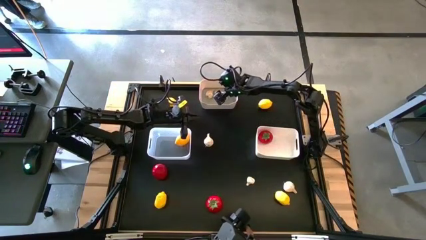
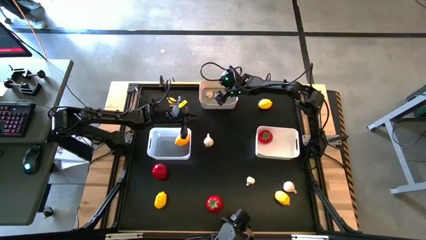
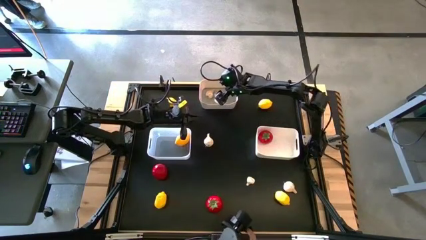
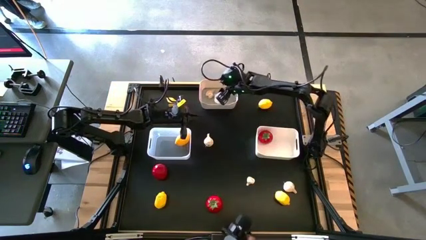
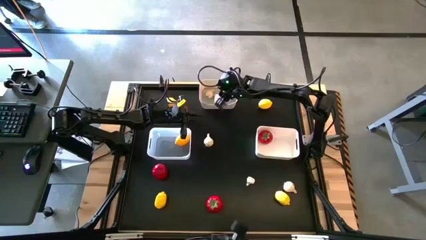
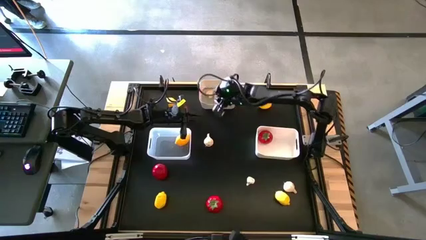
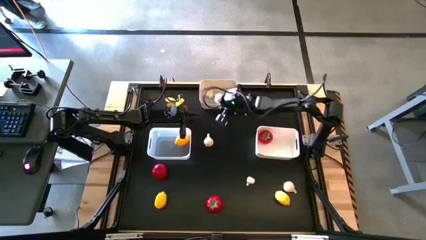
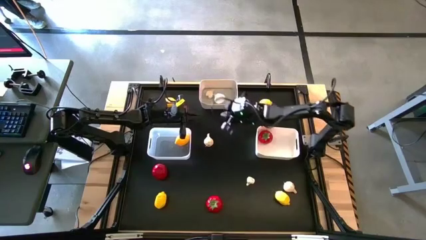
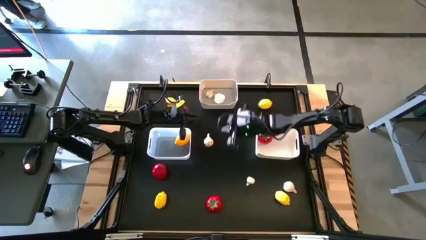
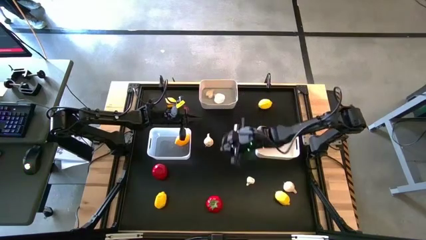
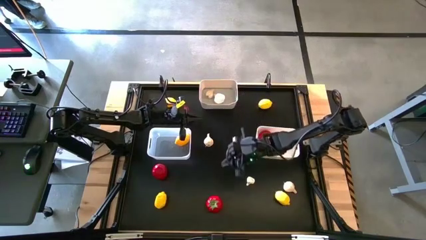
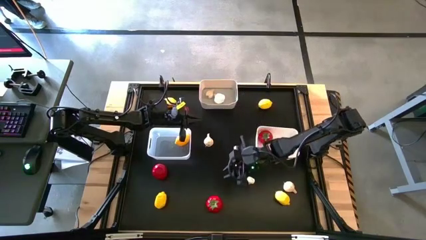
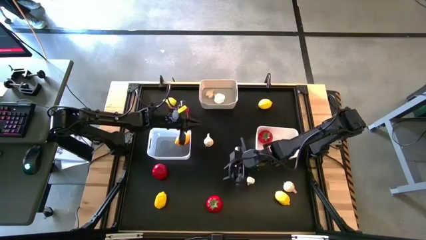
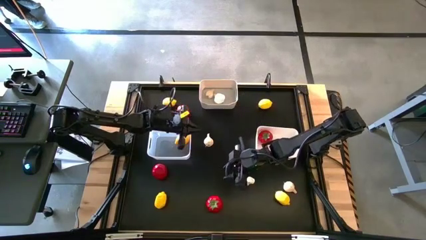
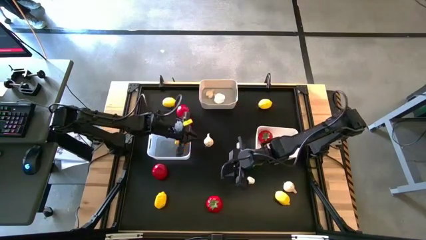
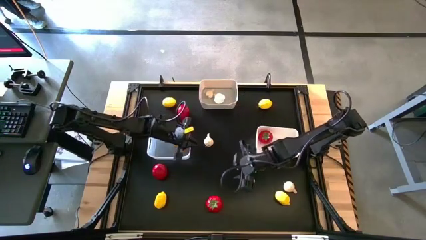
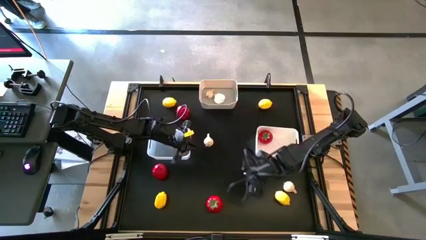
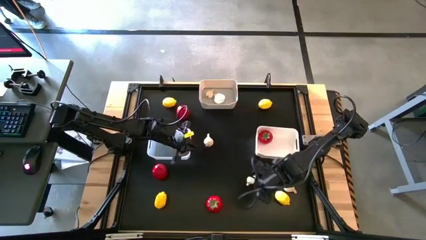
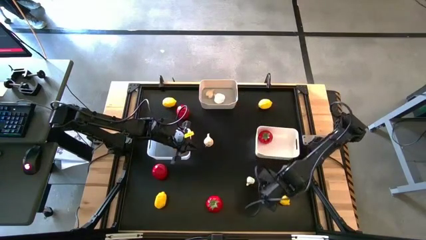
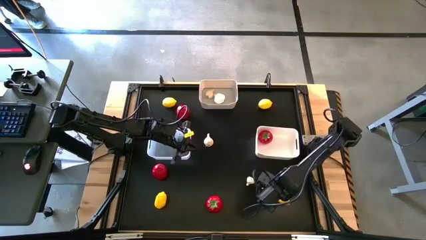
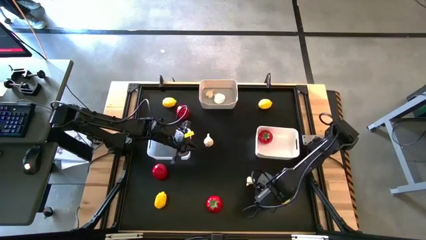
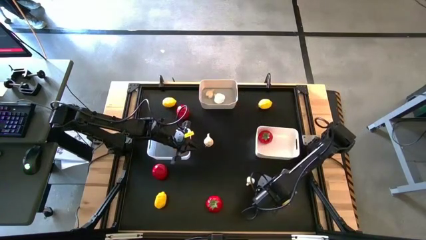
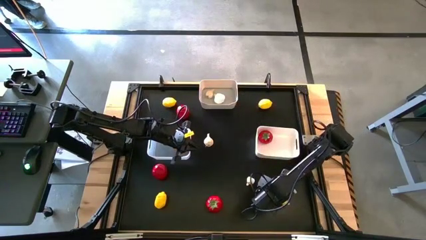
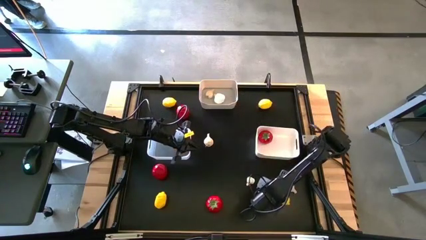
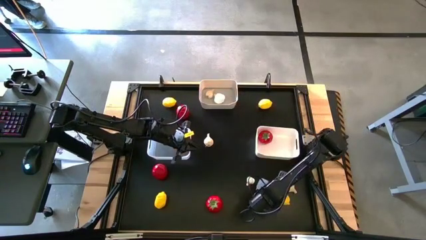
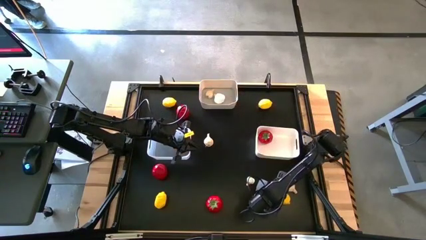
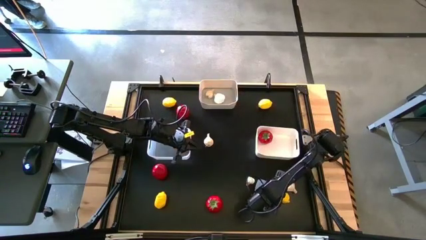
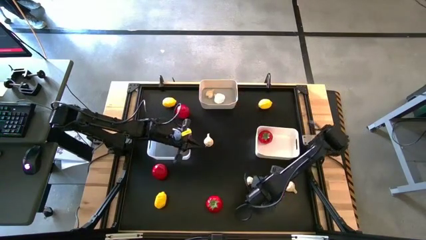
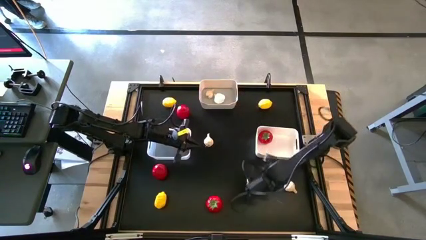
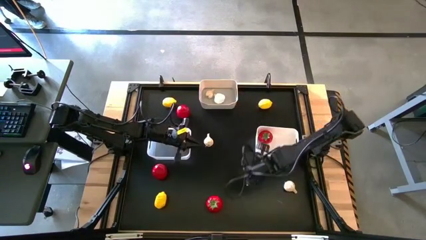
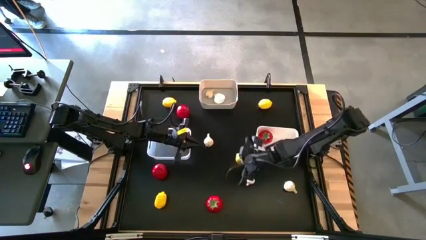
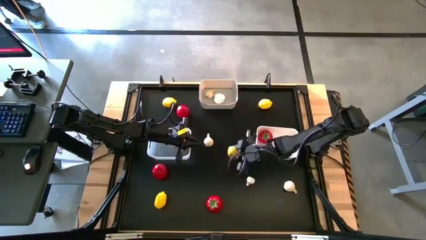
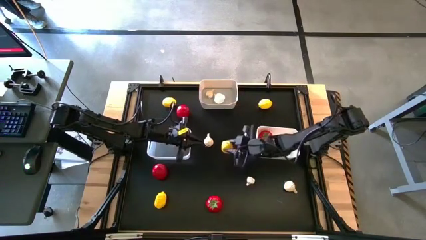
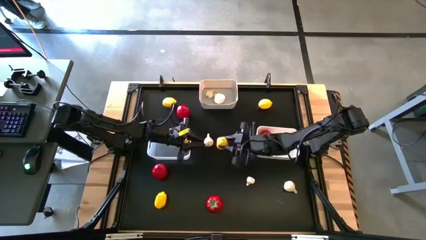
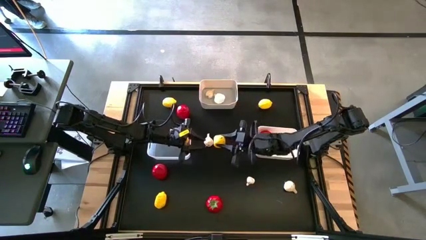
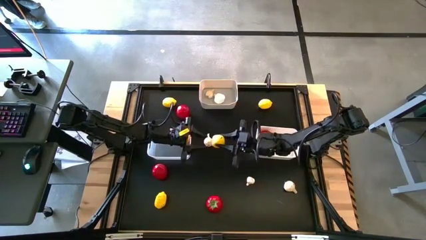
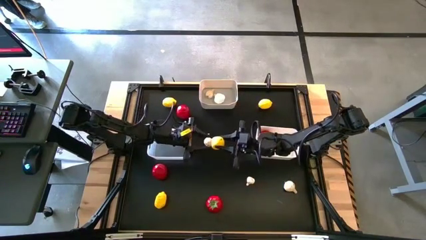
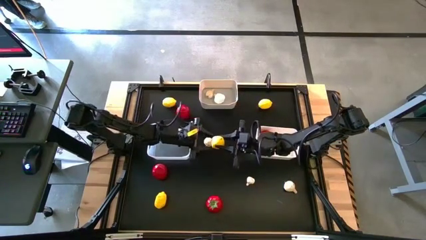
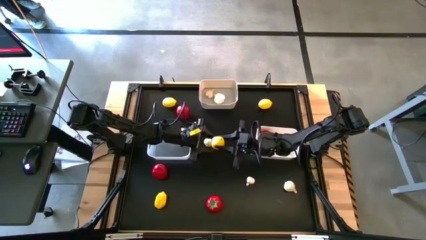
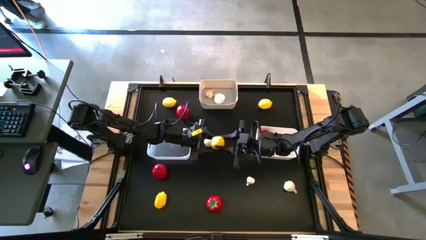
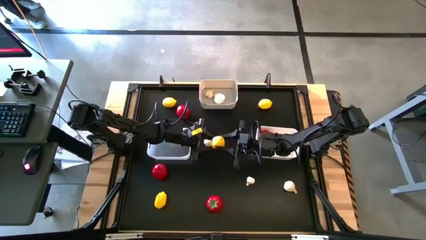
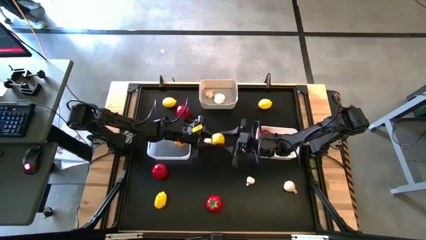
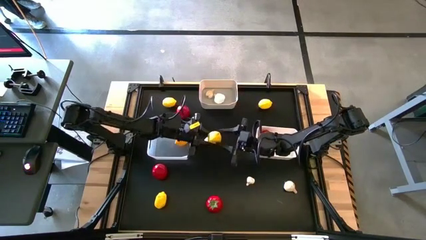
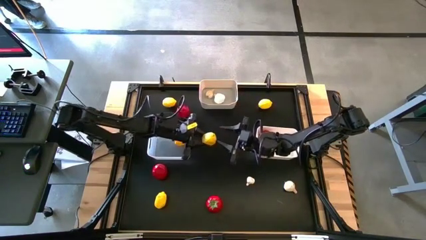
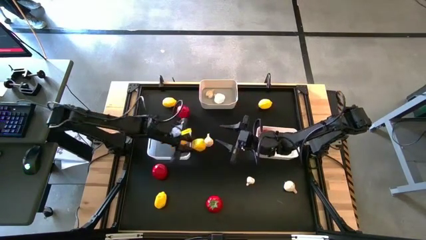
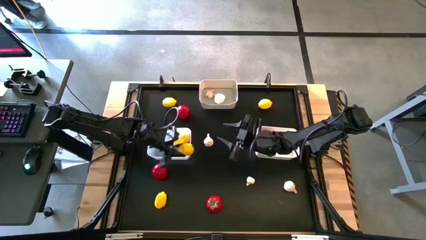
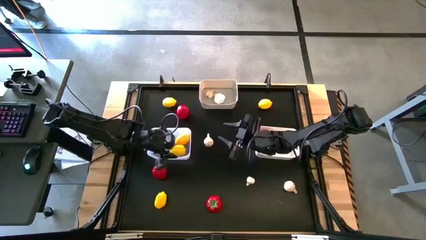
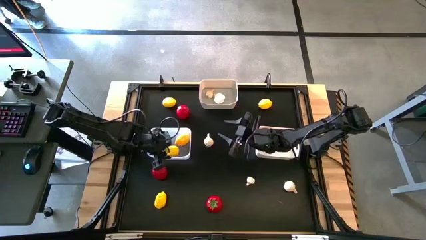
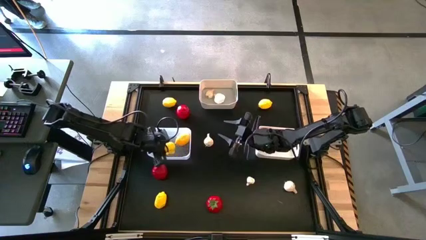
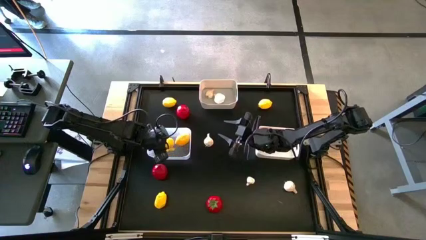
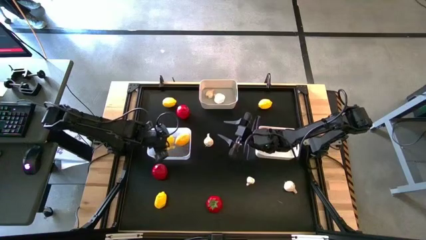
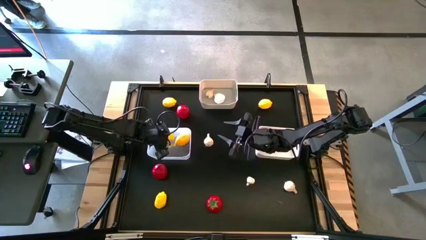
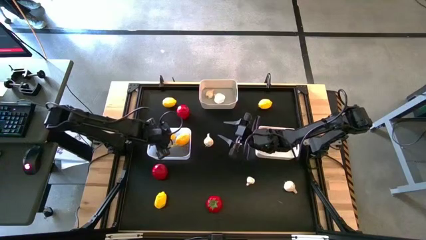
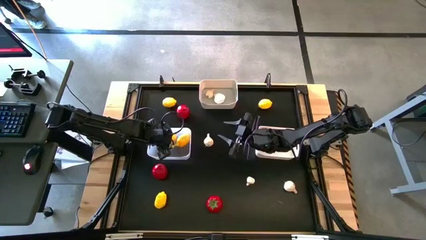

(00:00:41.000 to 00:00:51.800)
Task: Sort produce into baskets
Put the yellow lemon into the transparent bin
